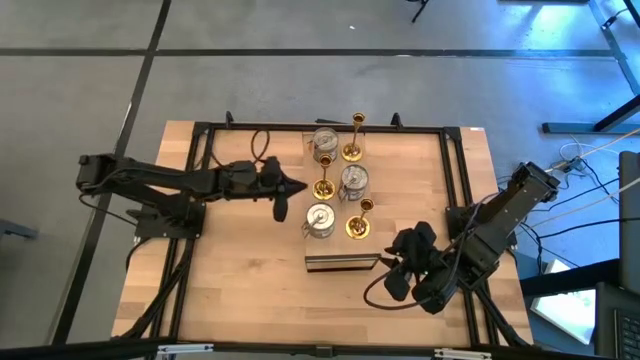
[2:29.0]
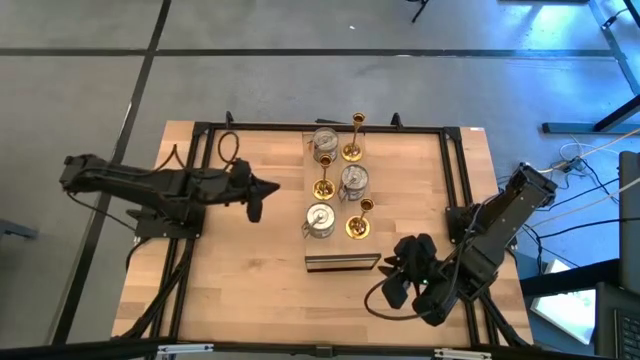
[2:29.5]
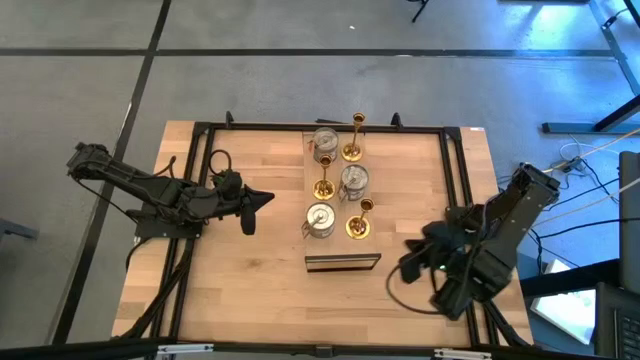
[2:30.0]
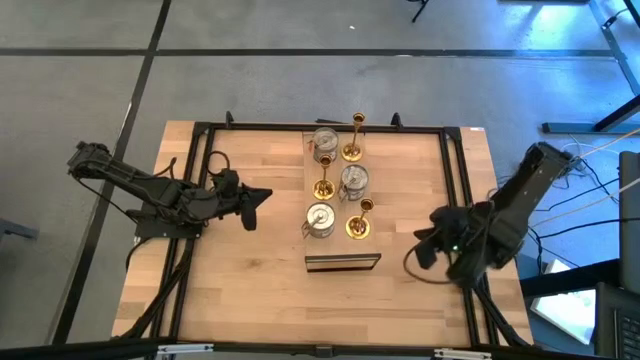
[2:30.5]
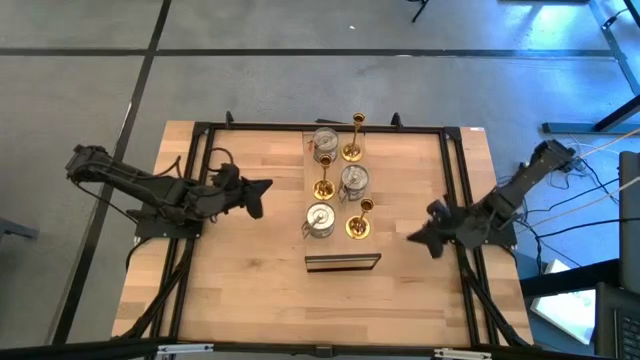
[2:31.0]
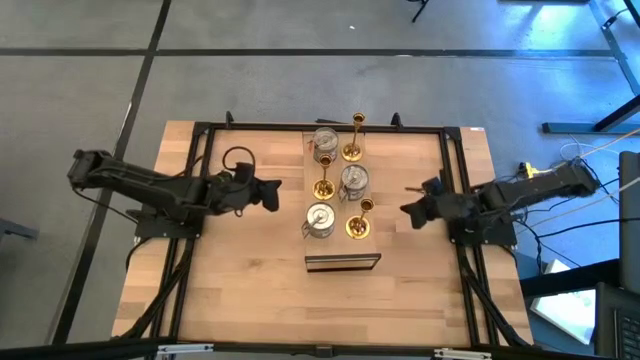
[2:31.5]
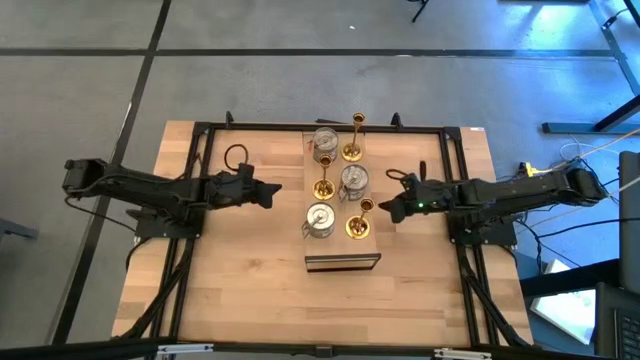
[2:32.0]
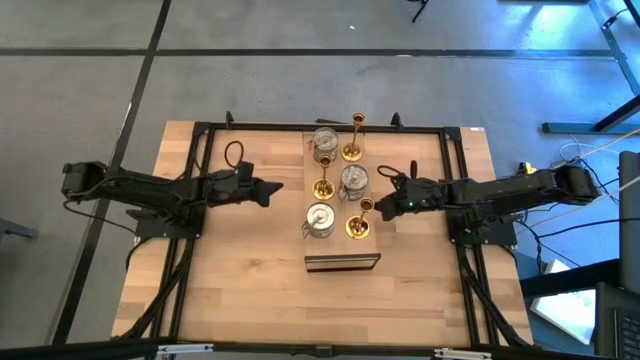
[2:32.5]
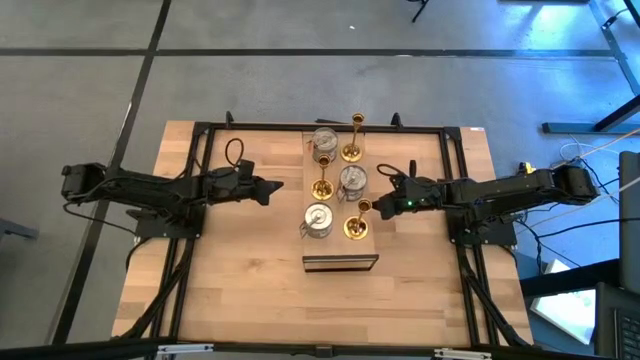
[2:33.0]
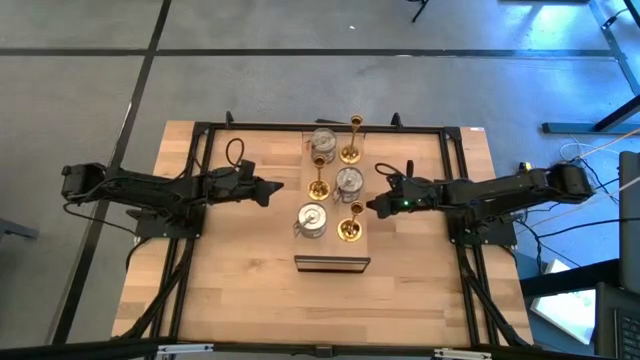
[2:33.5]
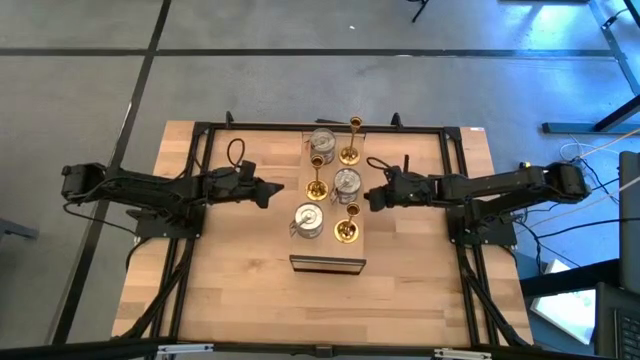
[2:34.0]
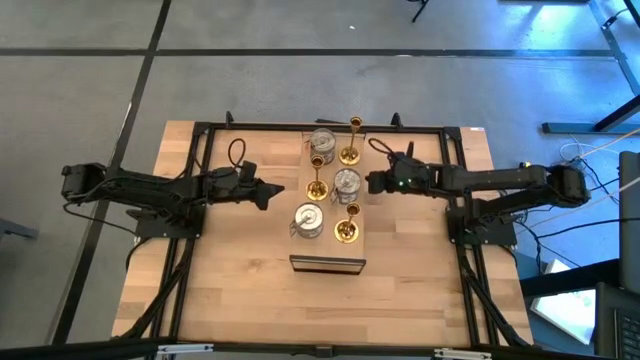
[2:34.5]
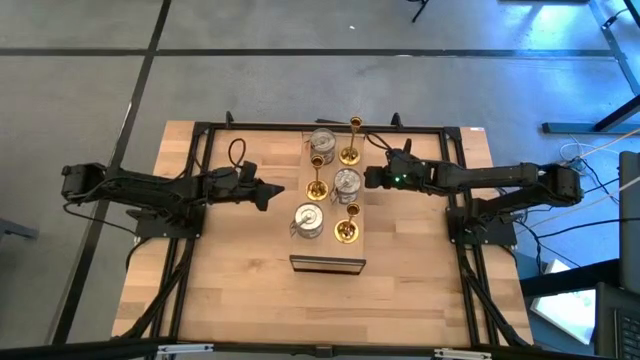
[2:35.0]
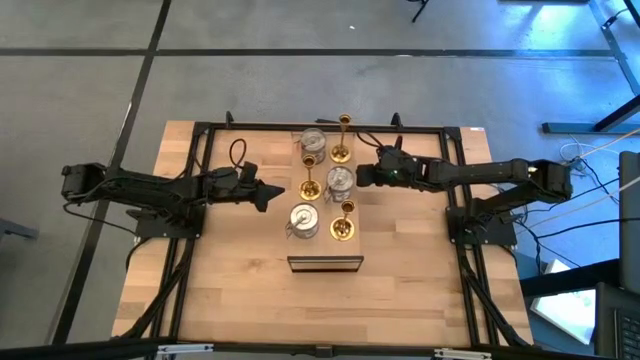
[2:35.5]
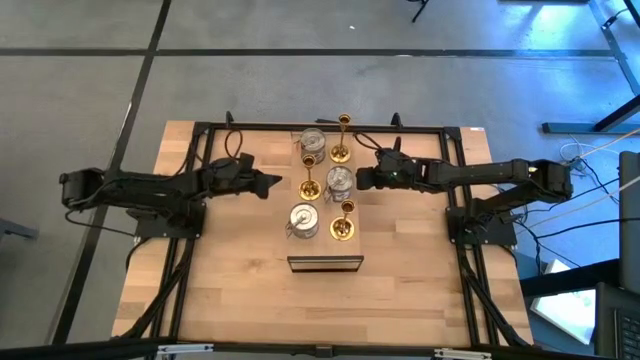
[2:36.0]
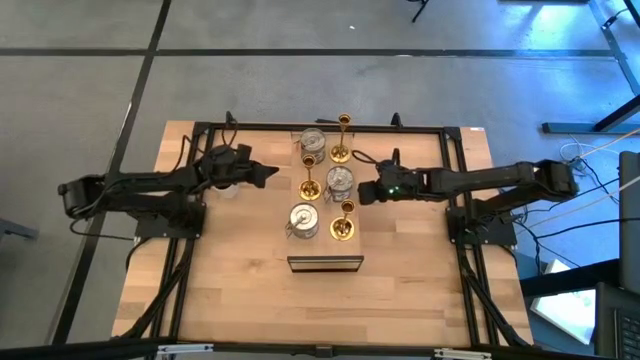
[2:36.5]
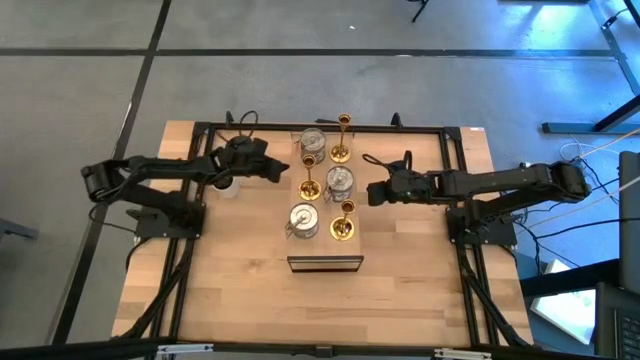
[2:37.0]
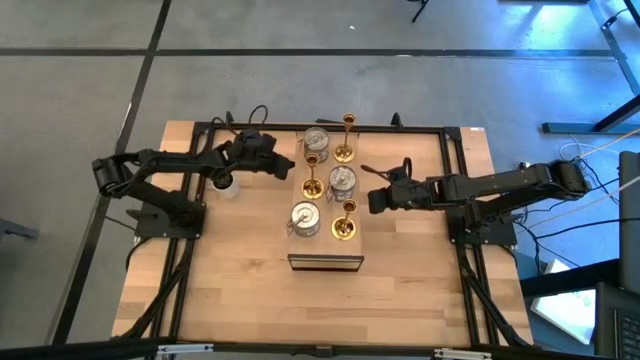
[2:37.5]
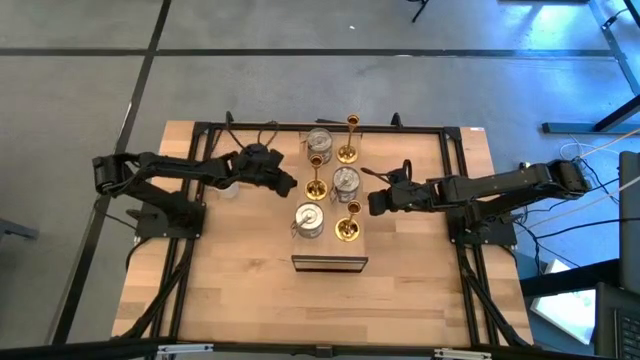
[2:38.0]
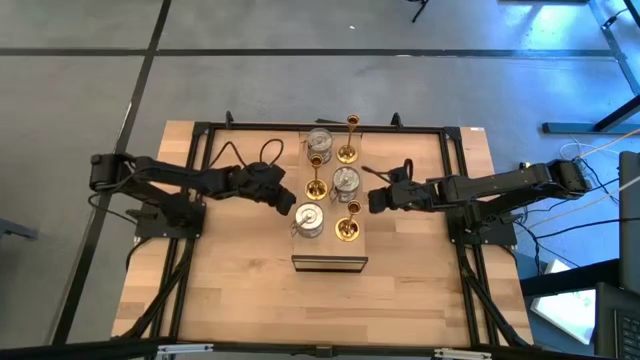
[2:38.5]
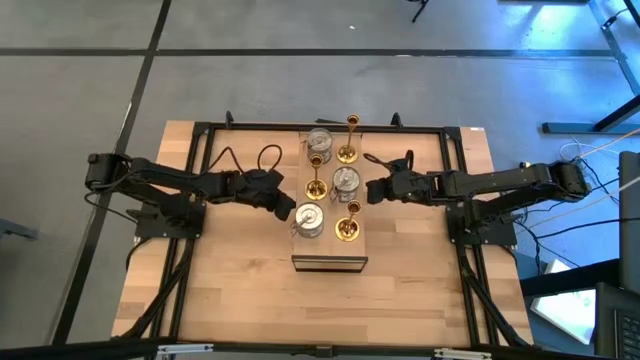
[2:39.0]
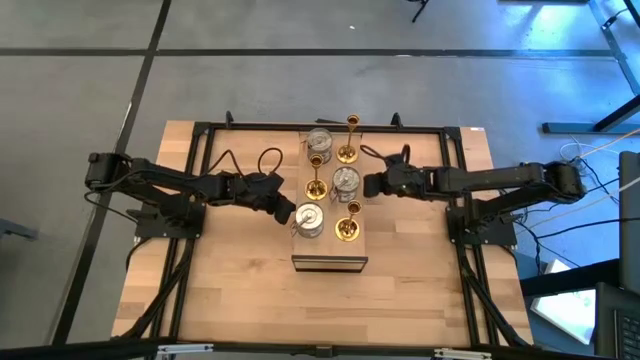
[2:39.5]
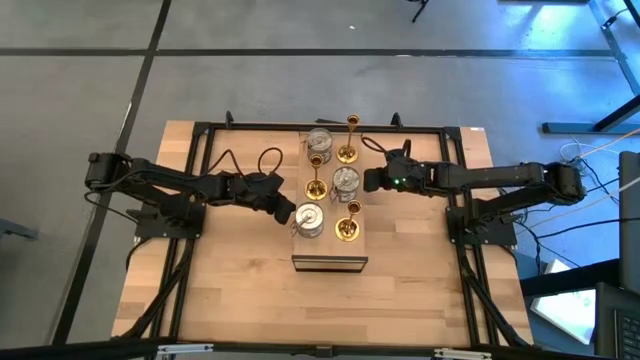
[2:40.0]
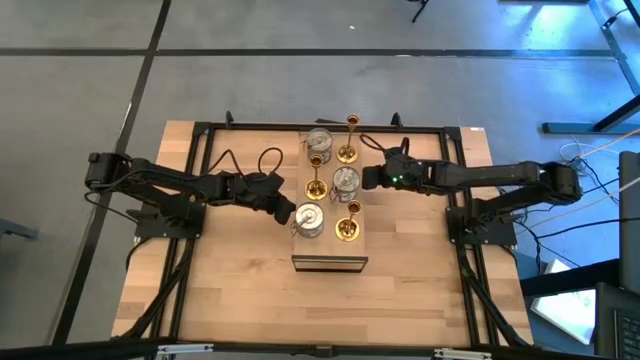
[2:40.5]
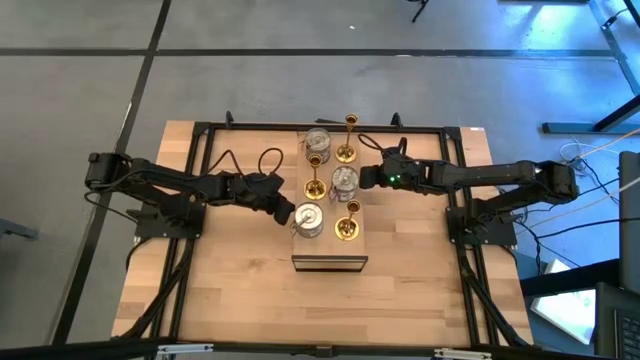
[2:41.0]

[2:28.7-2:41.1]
Task: Pick & Place candle stick holders
Adjust the shelf

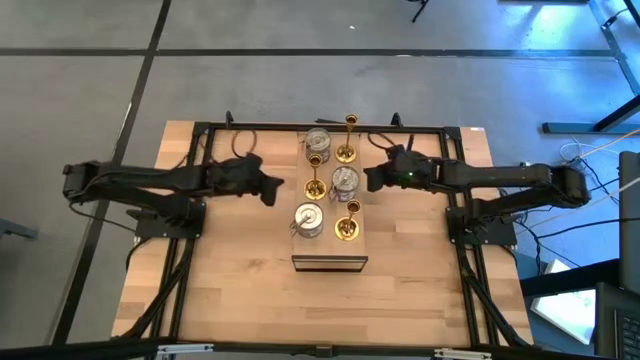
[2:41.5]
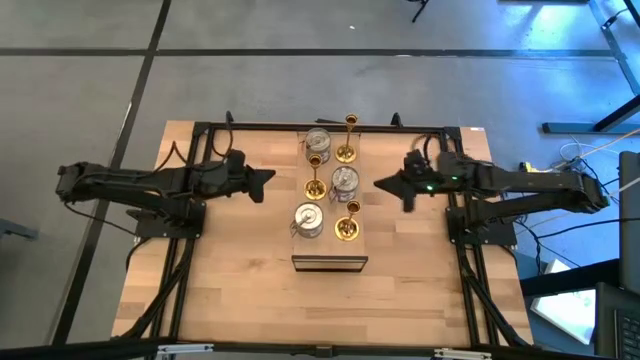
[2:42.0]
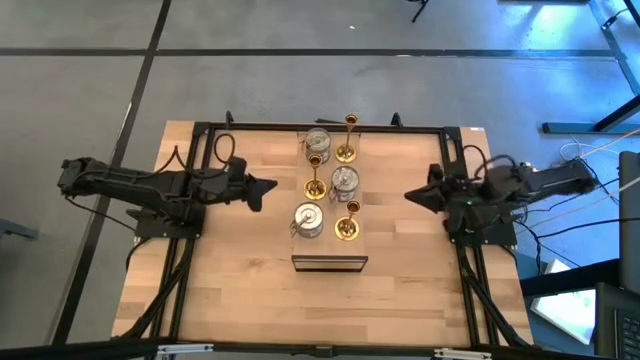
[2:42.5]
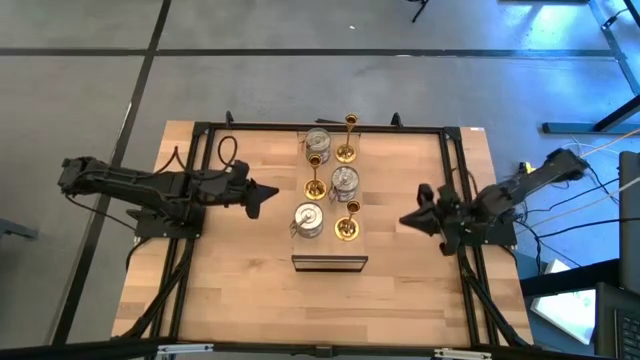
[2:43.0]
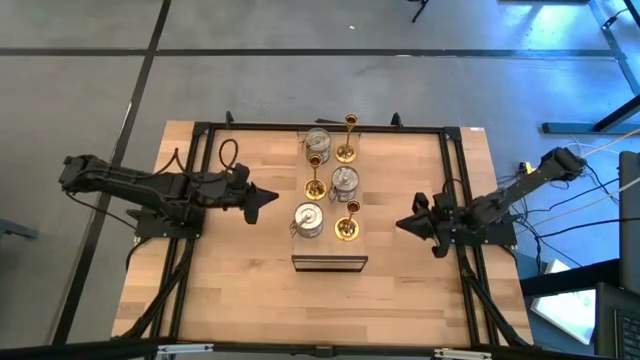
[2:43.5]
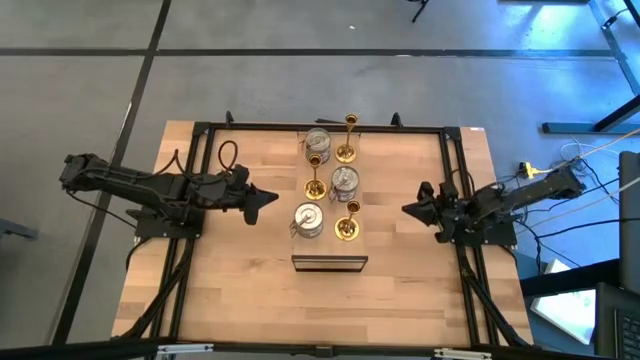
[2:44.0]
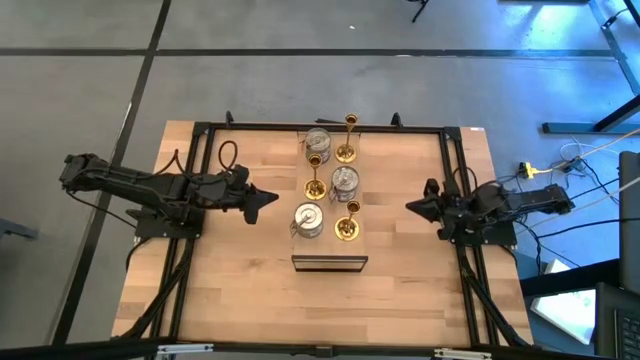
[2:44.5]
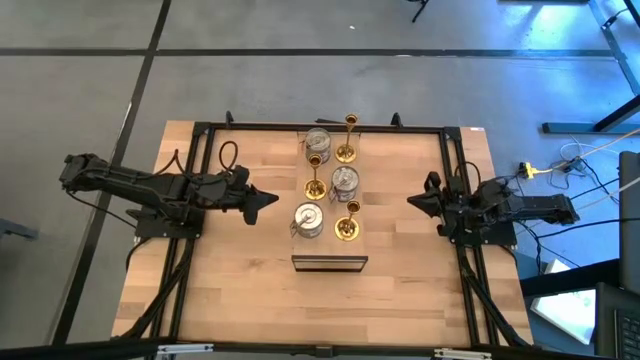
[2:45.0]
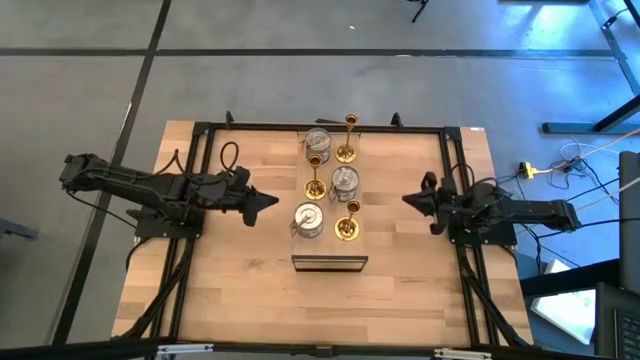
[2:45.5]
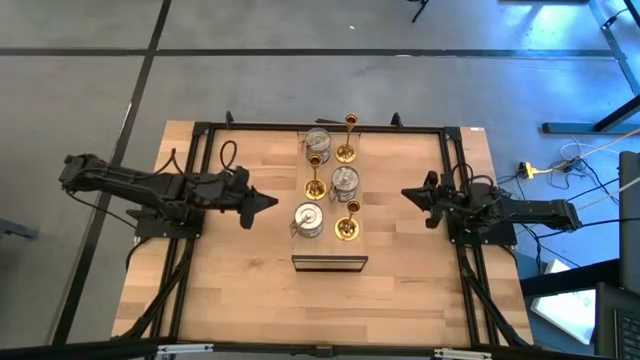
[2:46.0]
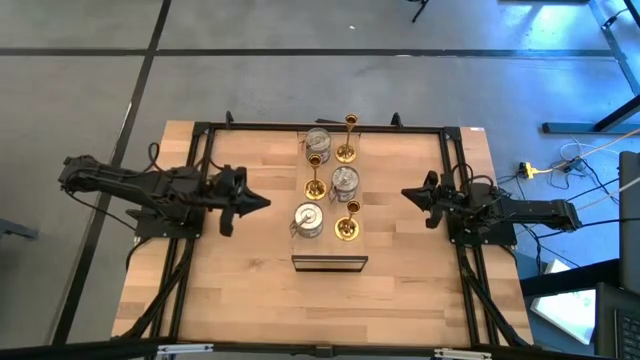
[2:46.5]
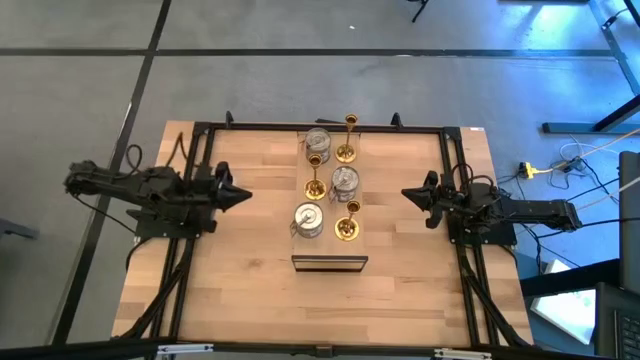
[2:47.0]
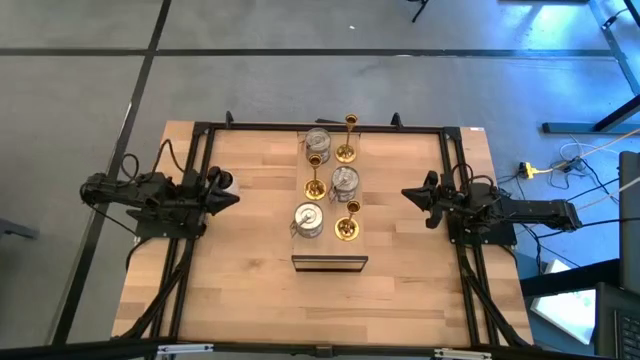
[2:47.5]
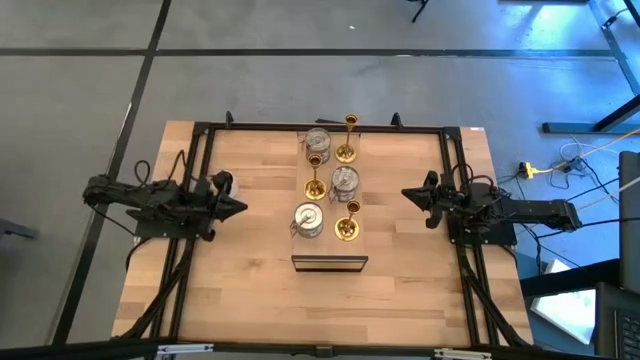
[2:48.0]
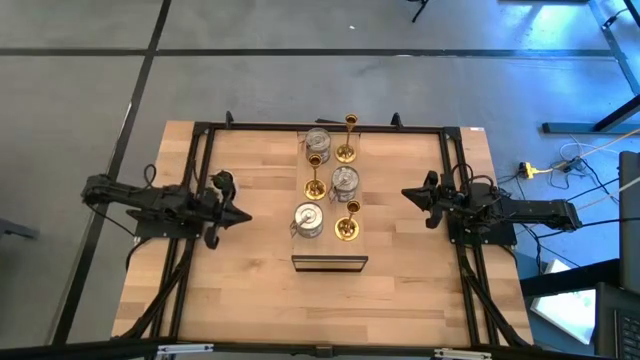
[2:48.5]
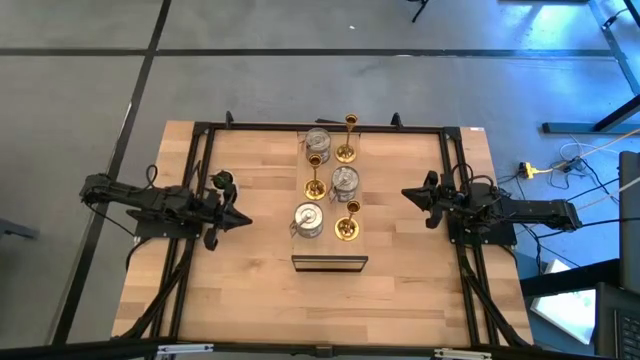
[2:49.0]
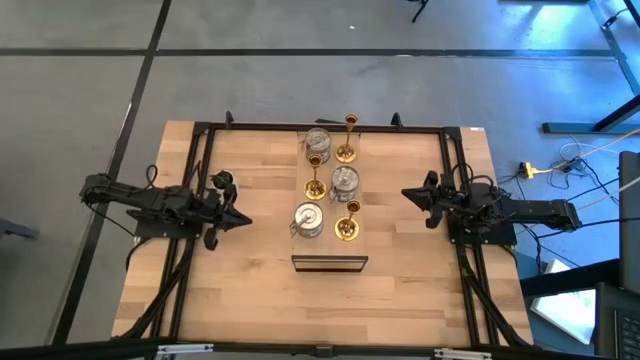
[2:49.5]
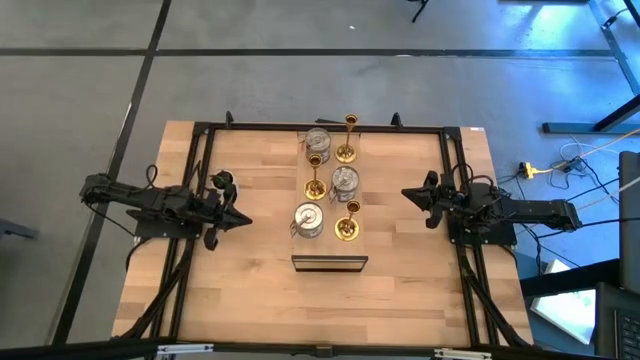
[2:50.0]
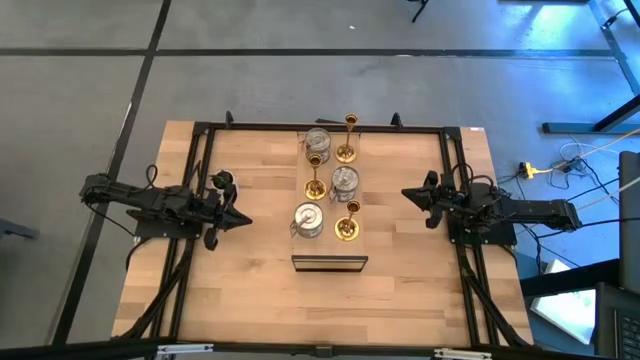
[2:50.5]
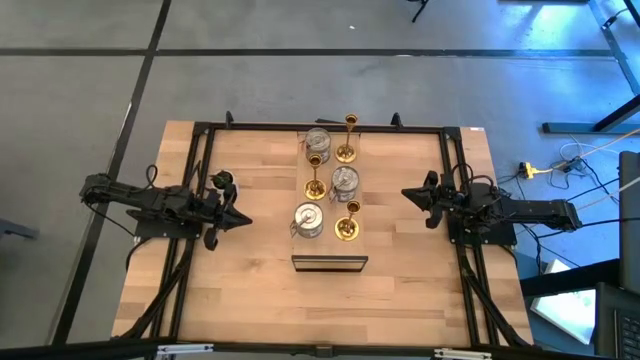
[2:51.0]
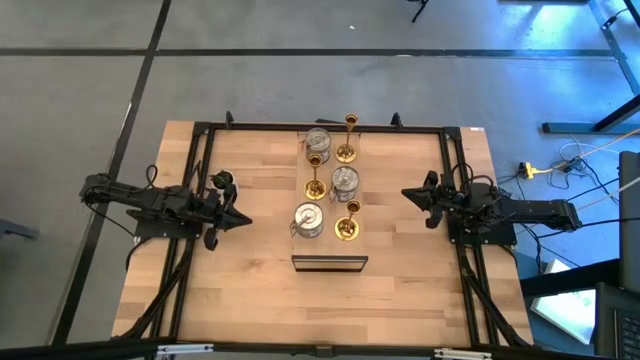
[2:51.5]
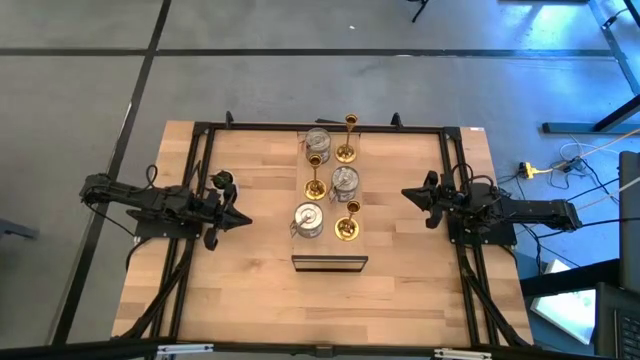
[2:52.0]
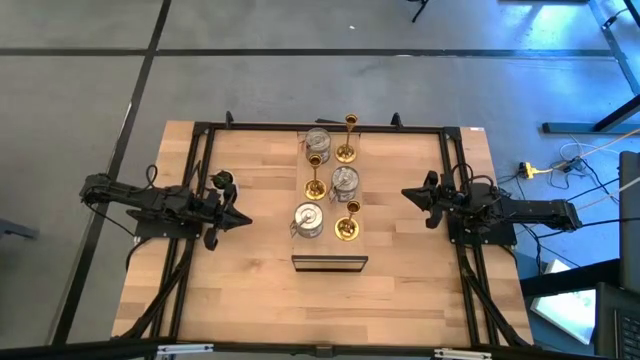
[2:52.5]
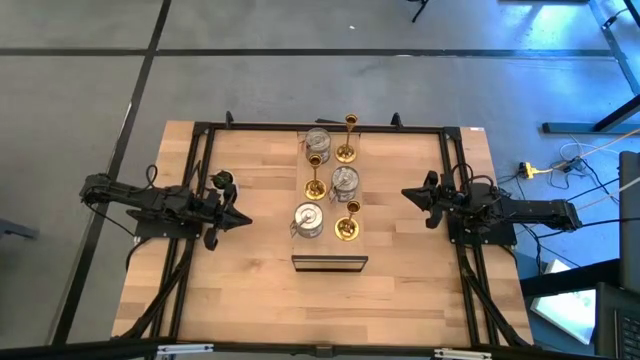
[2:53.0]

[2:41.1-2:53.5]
Return to Home Position
